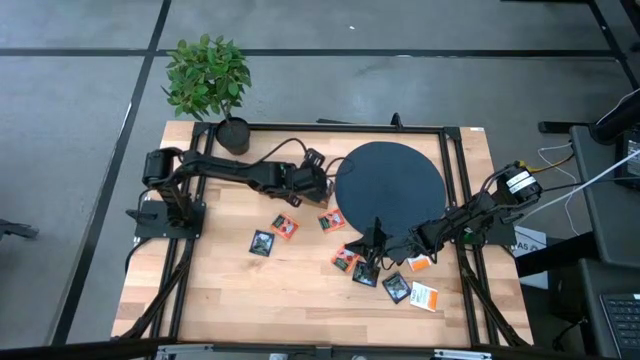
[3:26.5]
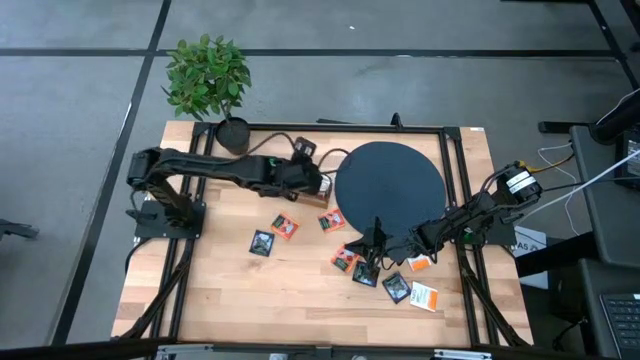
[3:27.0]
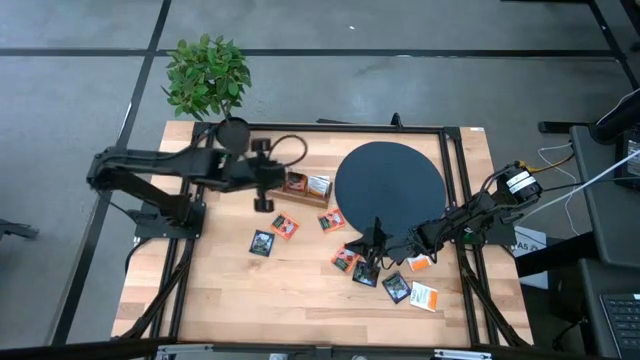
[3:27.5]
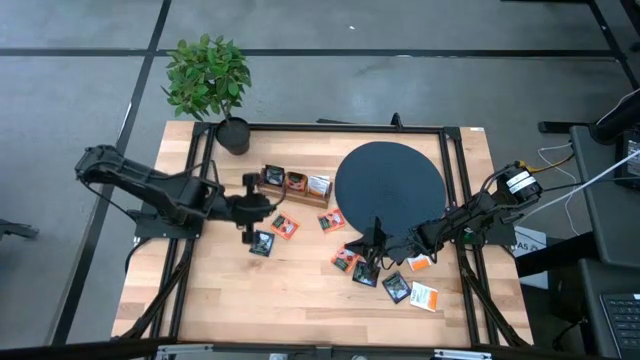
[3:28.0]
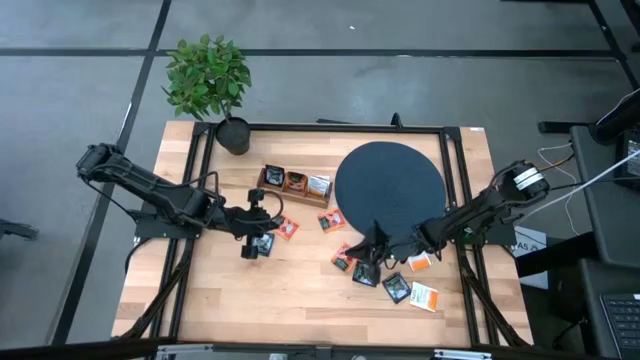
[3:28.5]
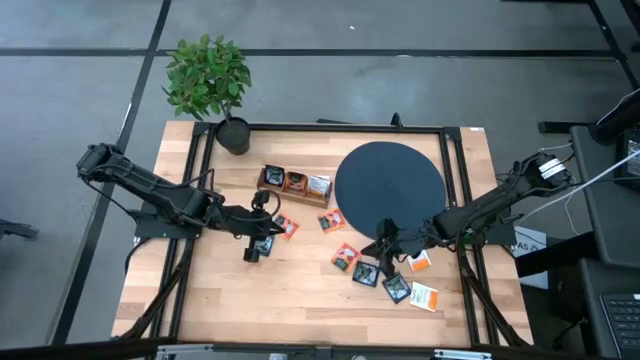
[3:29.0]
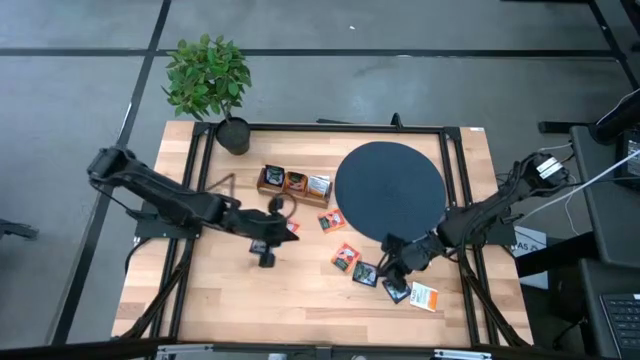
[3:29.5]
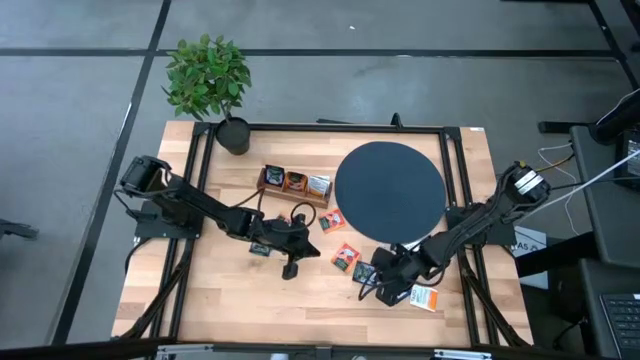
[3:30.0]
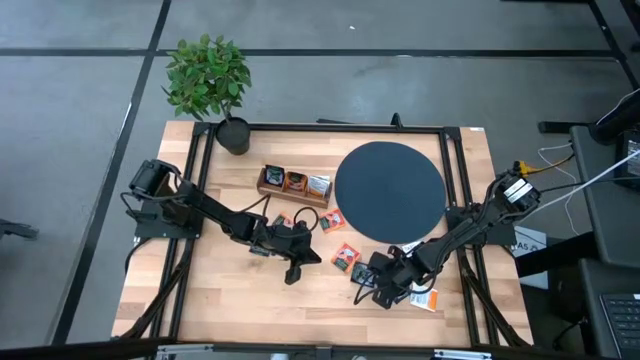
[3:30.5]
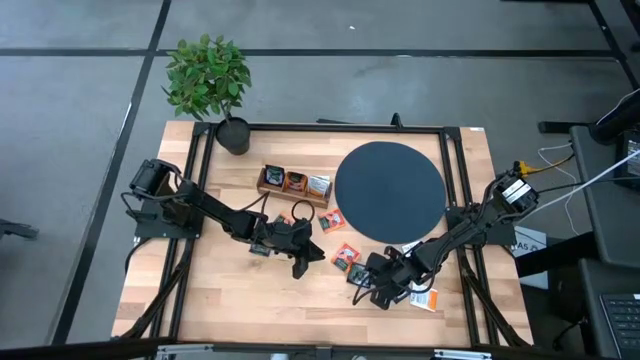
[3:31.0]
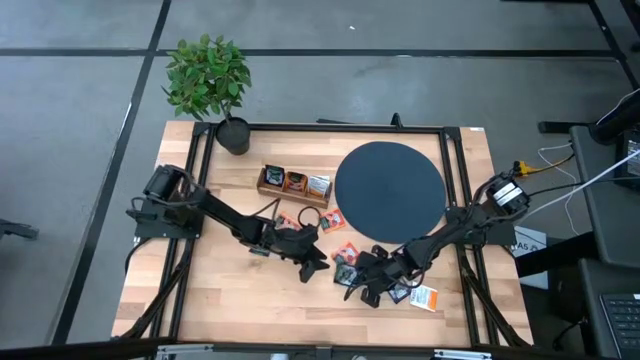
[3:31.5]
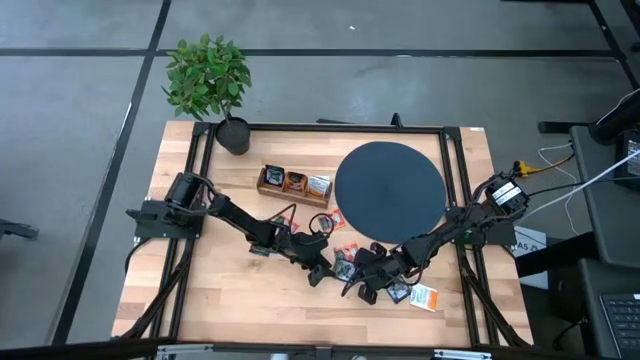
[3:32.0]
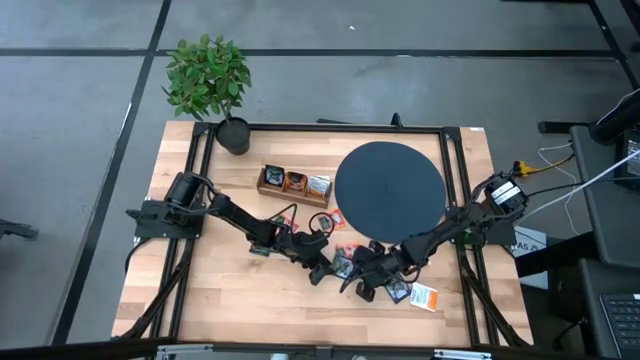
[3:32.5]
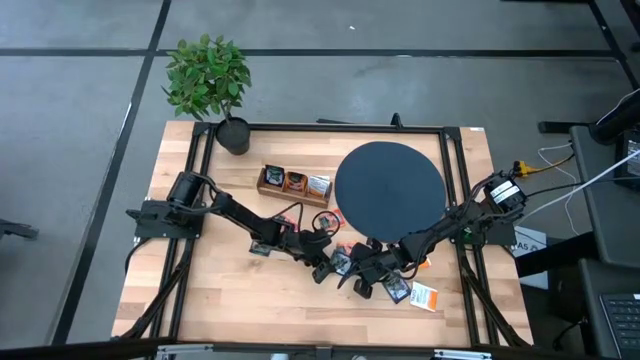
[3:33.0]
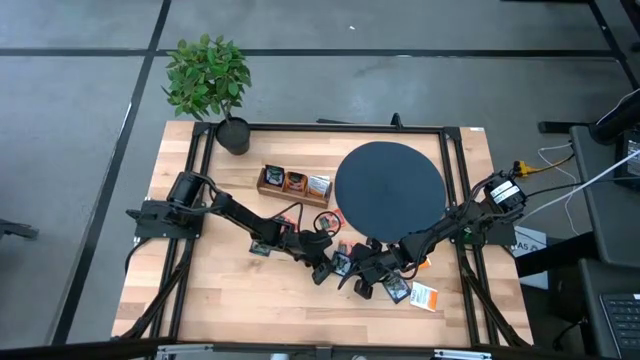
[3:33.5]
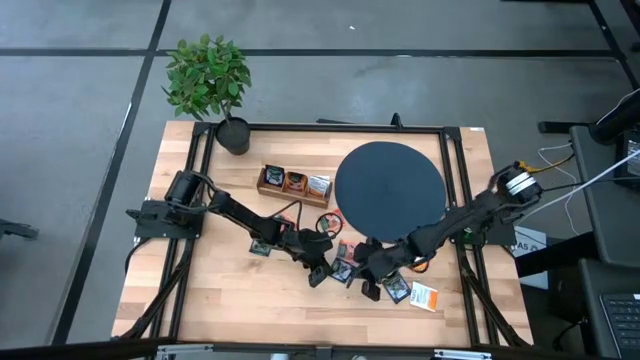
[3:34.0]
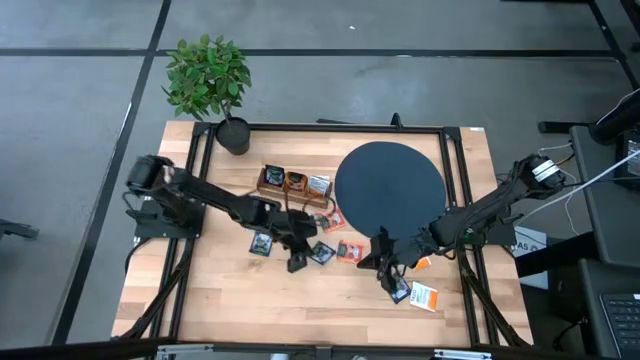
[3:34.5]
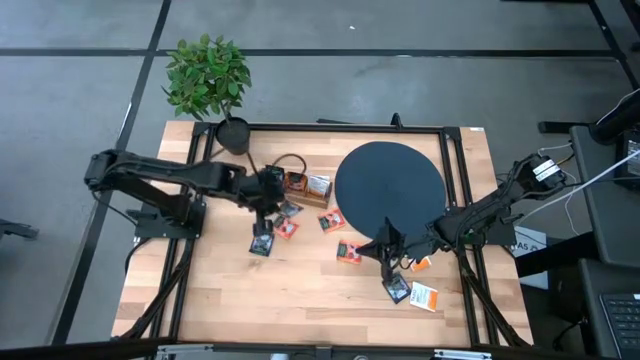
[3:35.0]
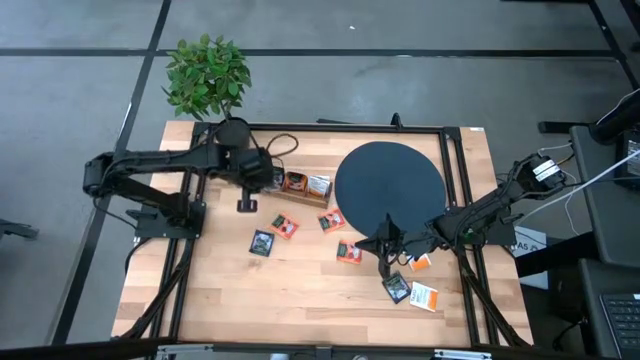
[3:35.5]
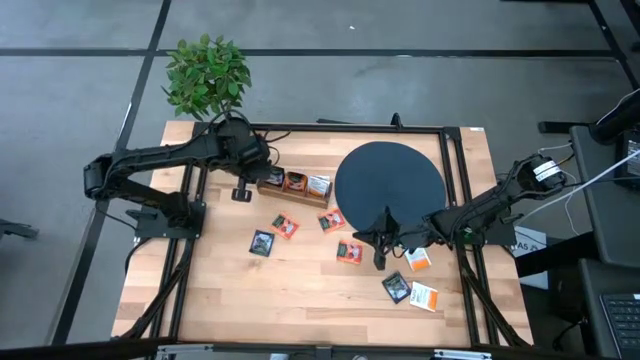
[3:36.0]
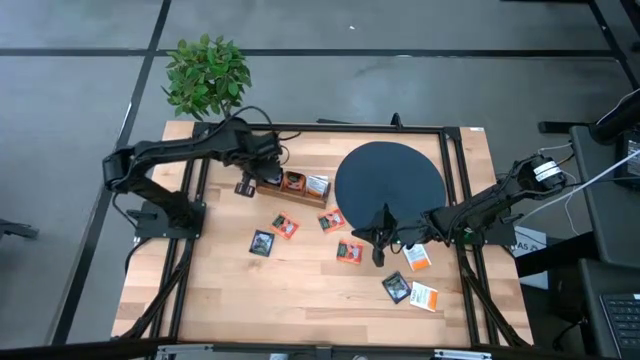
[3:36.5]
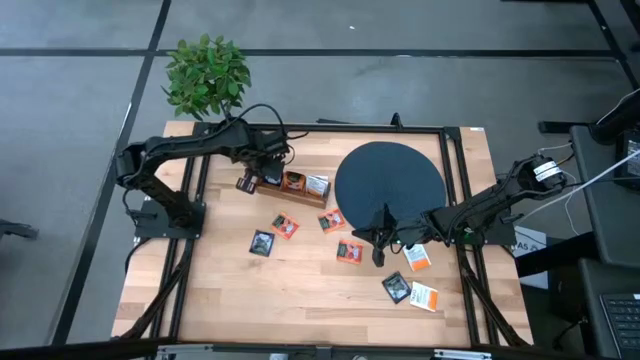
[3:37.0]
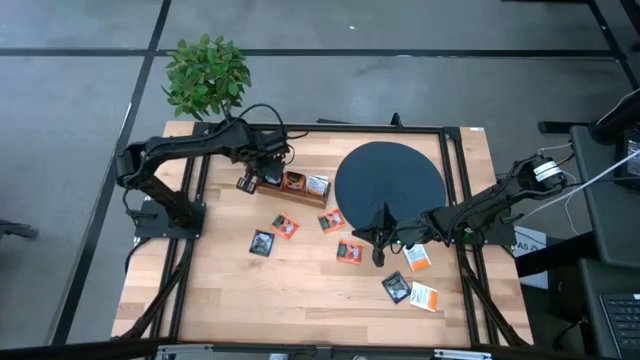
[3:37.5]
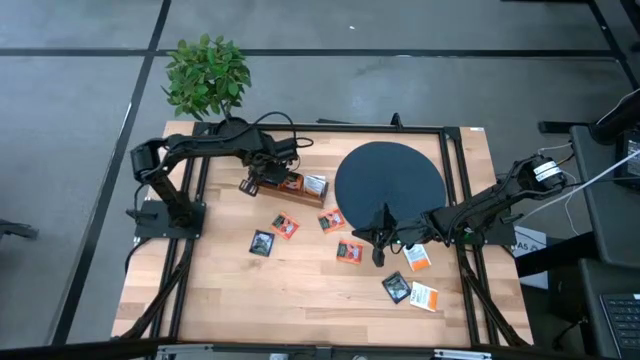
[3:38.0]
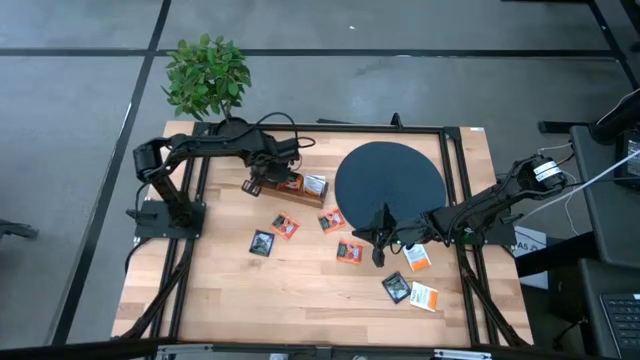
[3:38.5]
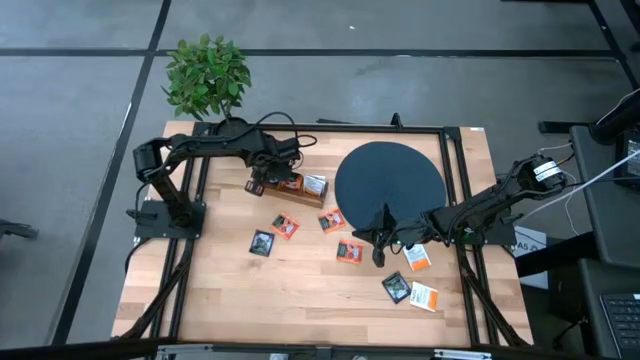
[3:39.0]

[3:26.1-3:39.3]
Task: Pick & Place Tea
Put the middle dark blue tea bag into the left section of the wooden organizer

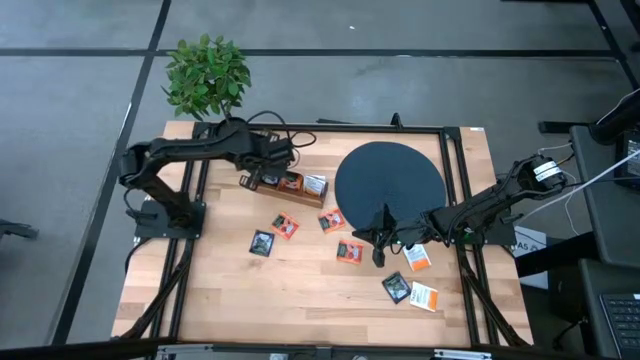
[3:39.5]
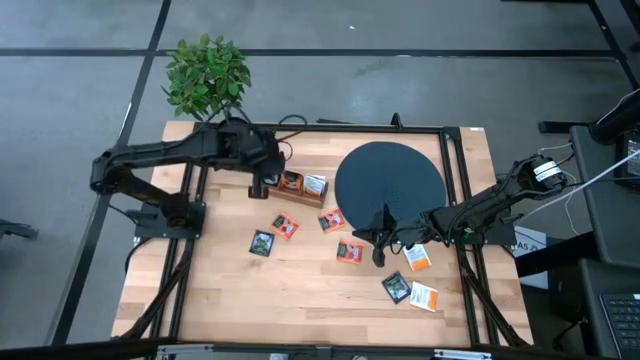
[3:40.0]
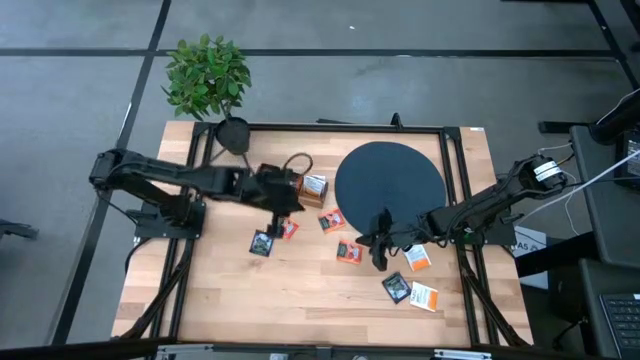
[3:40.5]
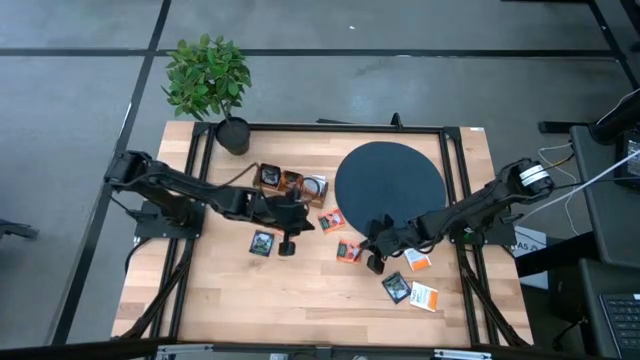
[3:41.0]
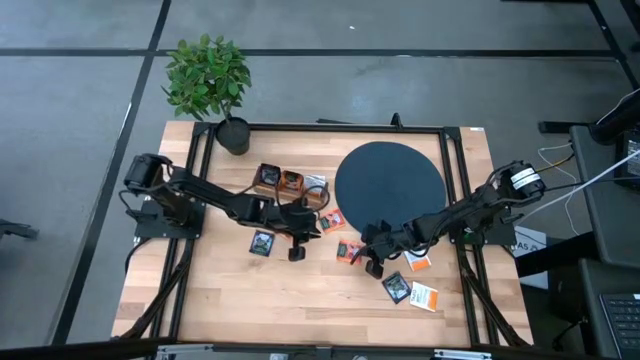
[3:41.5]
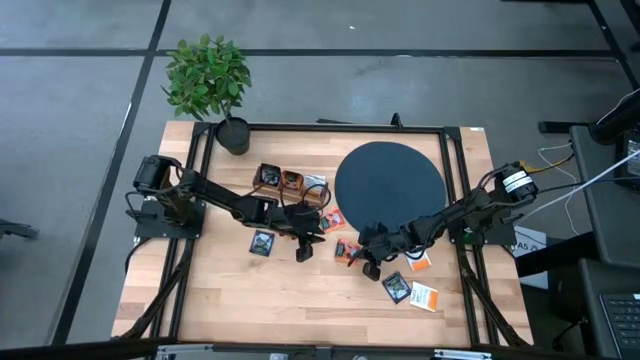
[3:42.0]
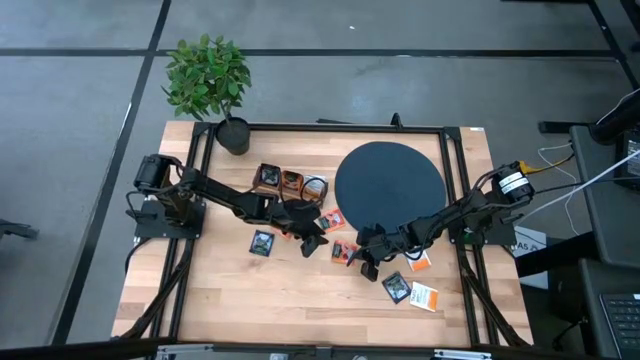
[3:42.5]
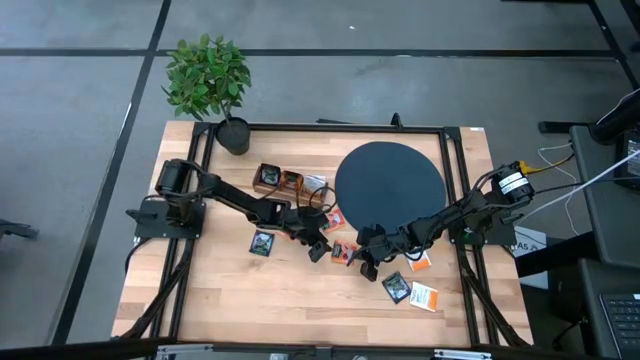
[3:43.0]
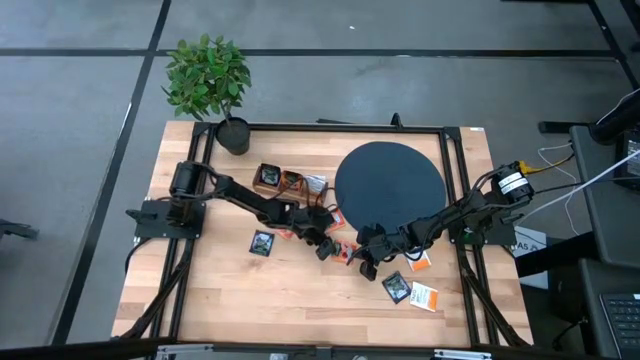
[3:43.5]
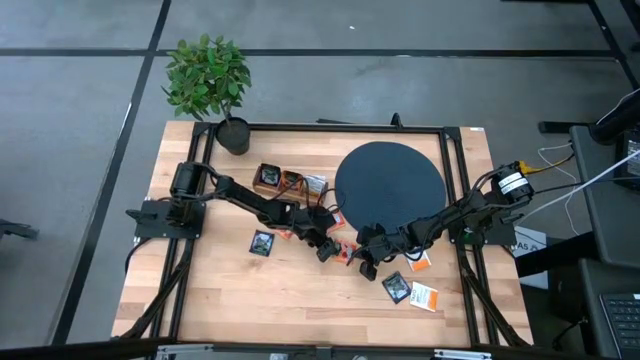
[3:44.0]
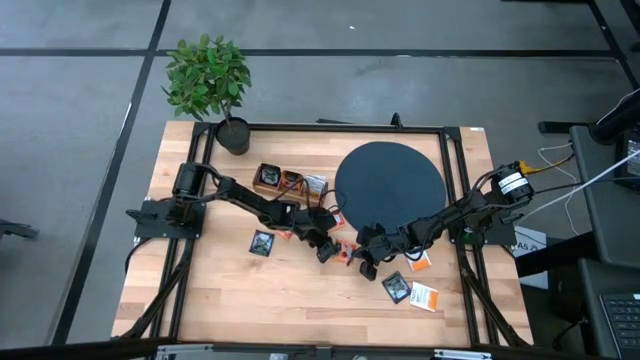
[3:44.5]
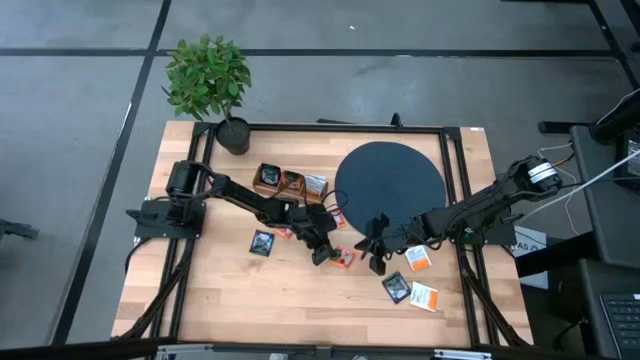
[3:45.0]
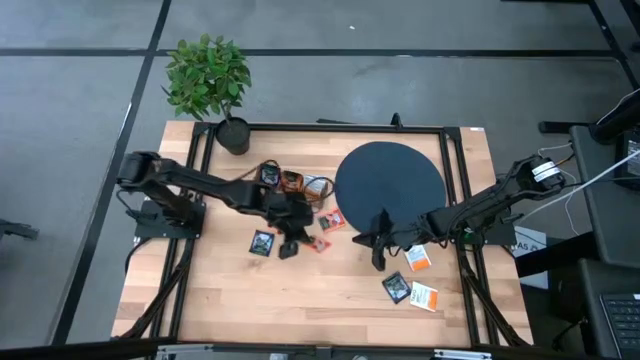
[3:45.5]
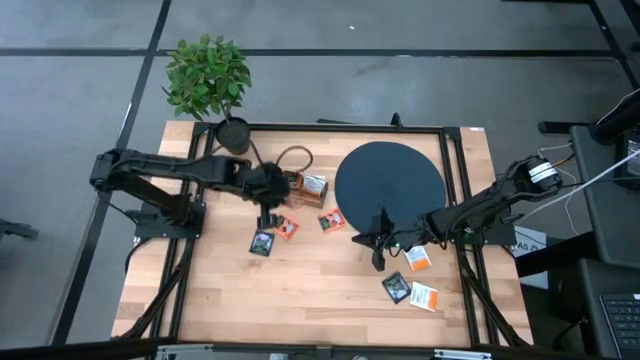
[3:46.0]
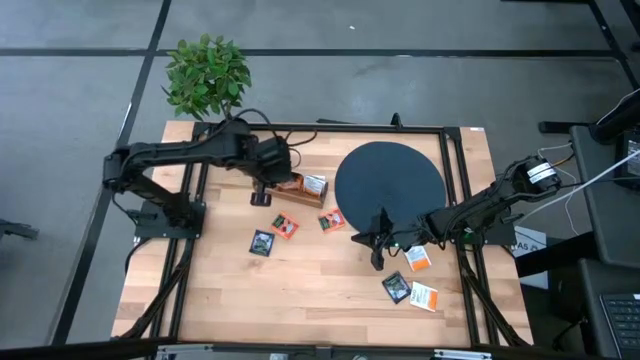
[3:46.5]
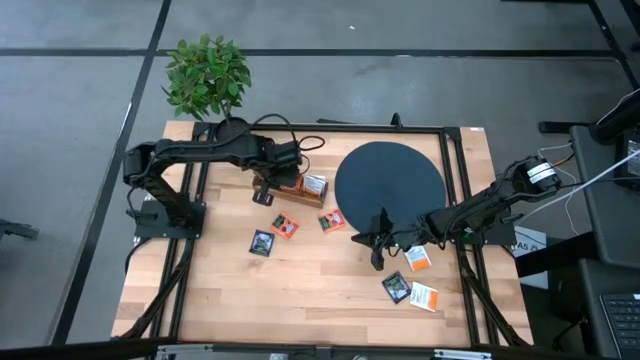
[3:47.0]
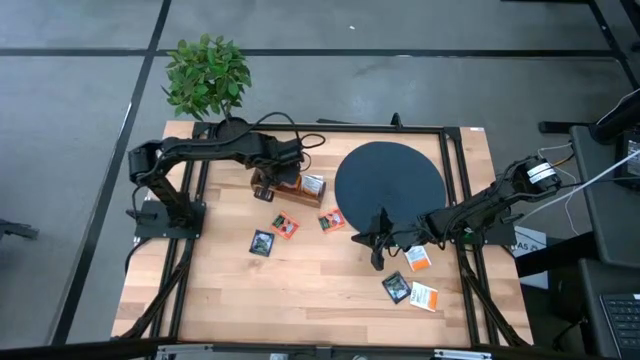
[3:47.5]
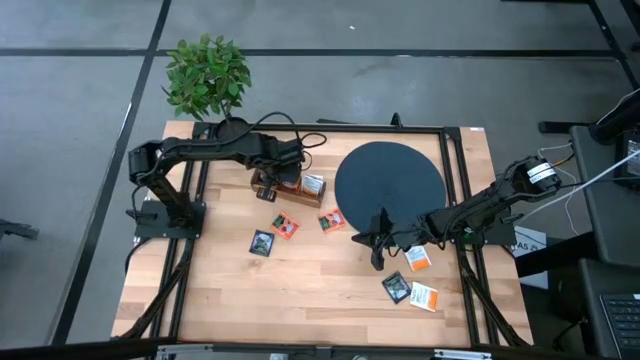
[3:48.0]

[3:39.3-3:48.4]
Put the right orange tea bag into the middle section of the wooden organizer
